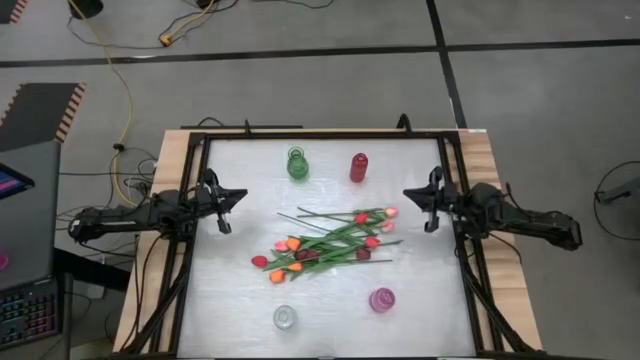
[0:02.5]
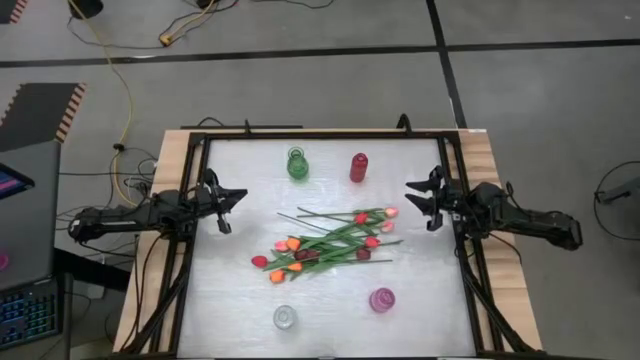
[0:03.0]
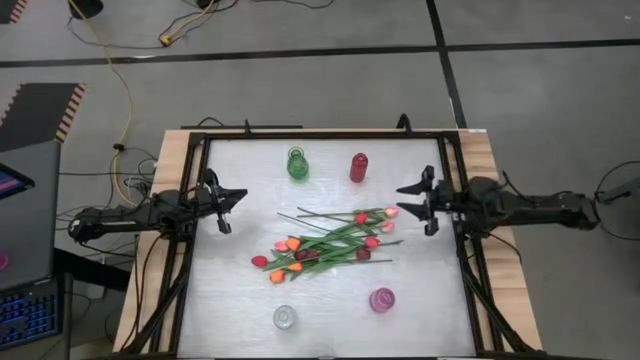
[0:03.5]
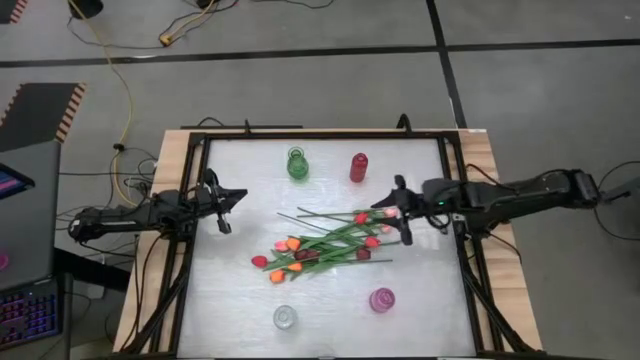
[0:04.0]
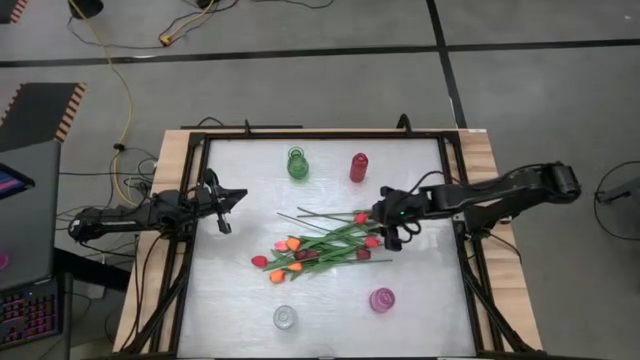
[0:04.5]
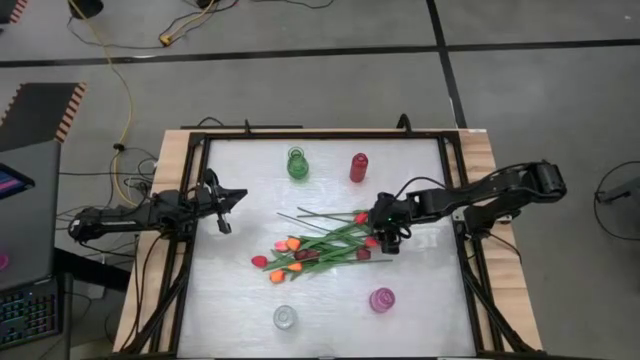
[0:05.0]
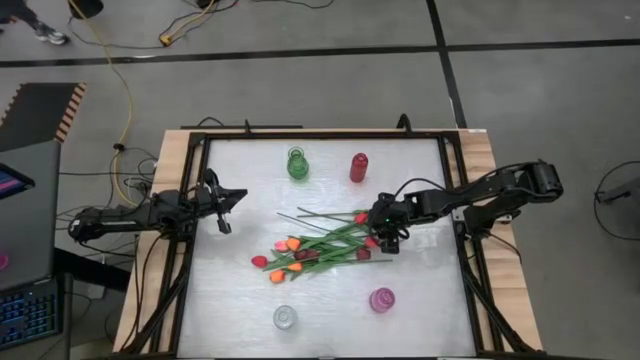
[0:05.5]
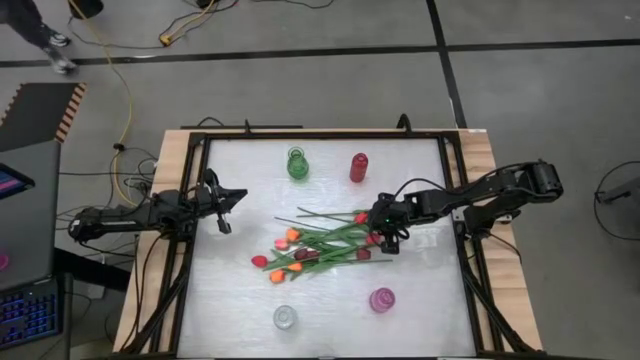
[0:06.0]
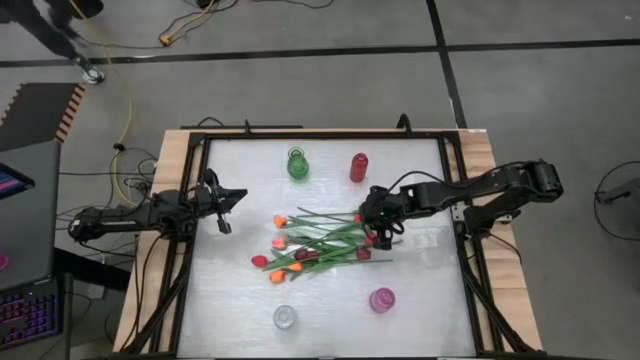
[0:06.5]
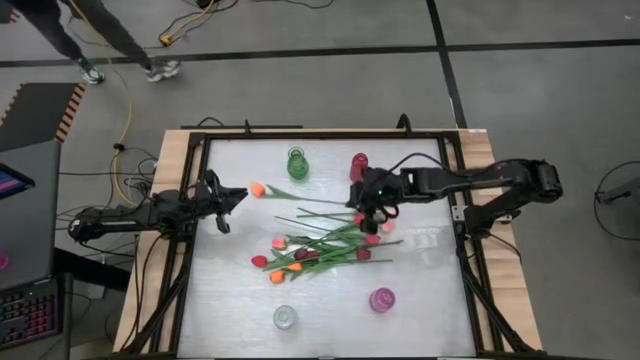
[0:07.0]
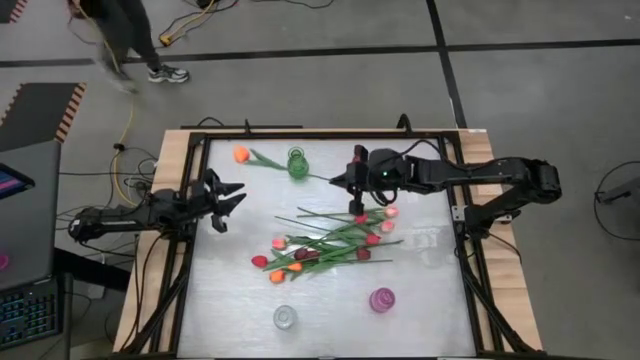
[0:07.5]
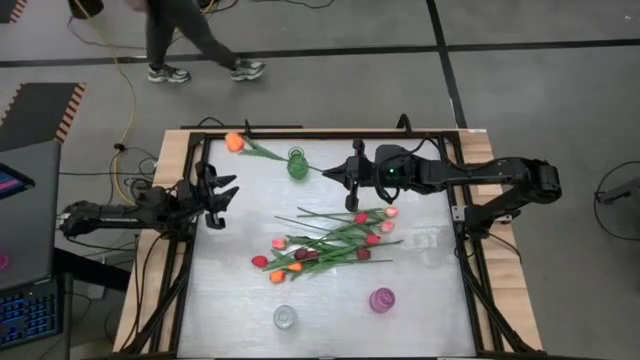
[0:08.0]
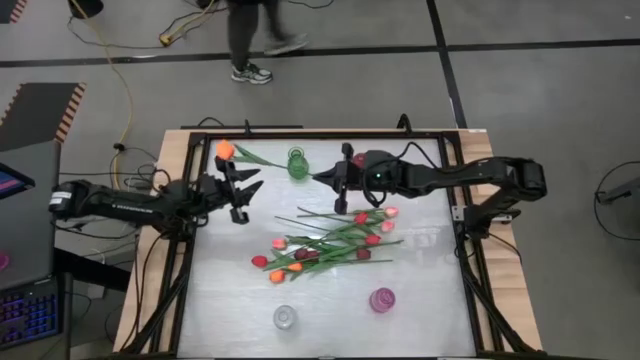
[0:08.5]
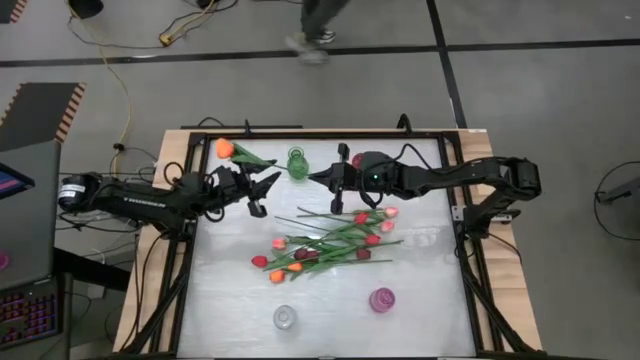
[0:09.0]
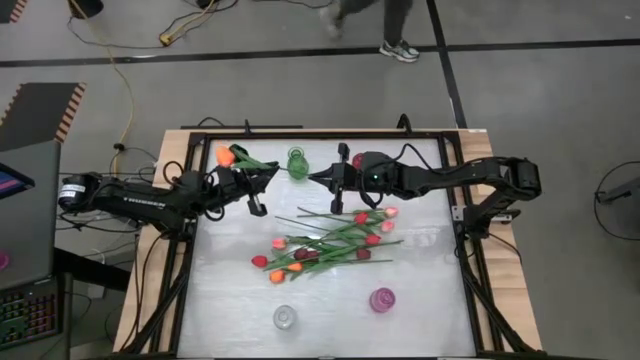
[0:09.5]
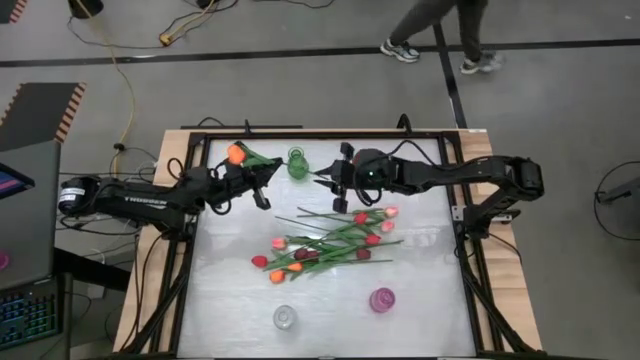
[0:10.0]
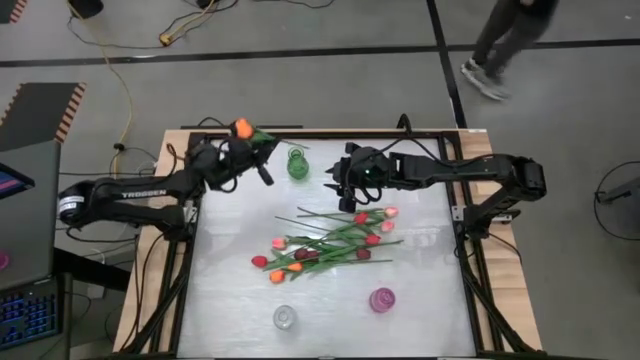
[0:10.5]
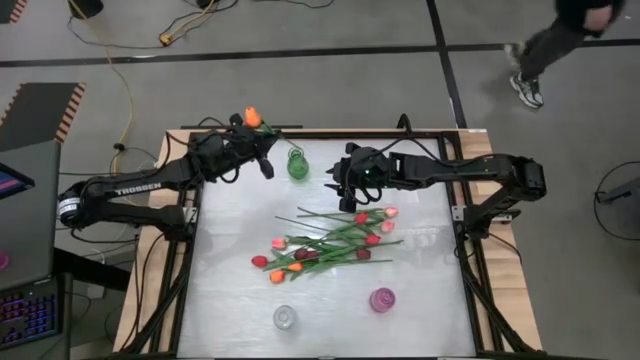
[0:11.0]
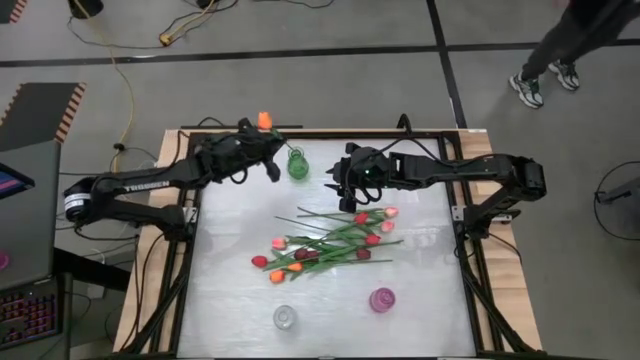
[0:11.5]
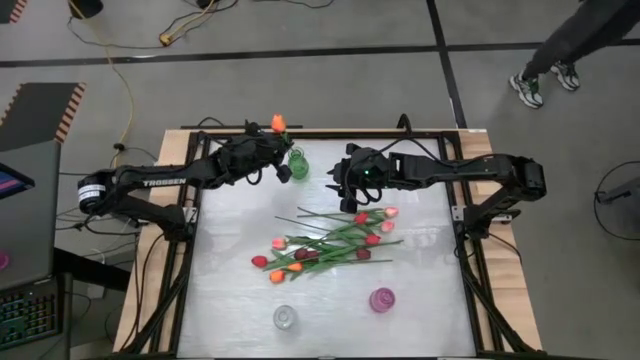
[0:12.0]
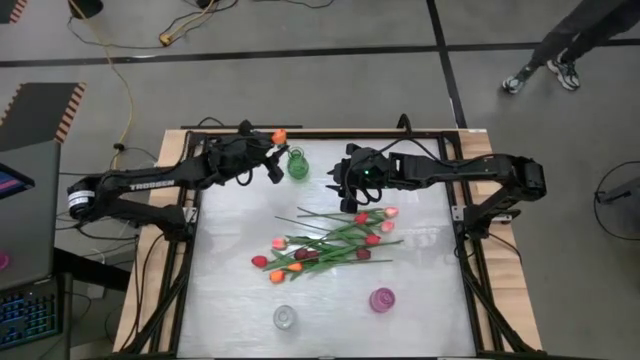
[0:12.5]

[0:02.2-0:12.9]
Task: Sort flowers into vase by color
Put the orange flower into the green vase

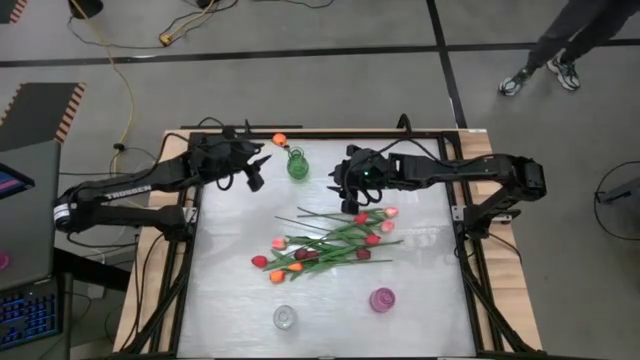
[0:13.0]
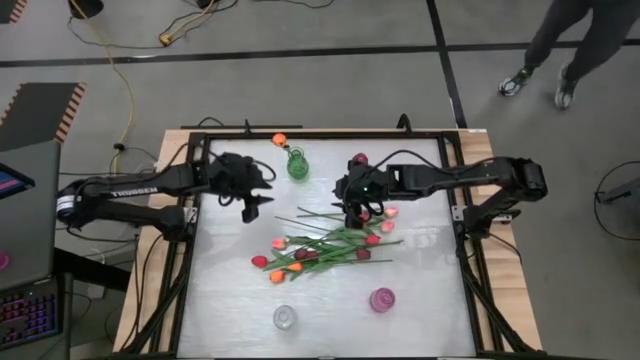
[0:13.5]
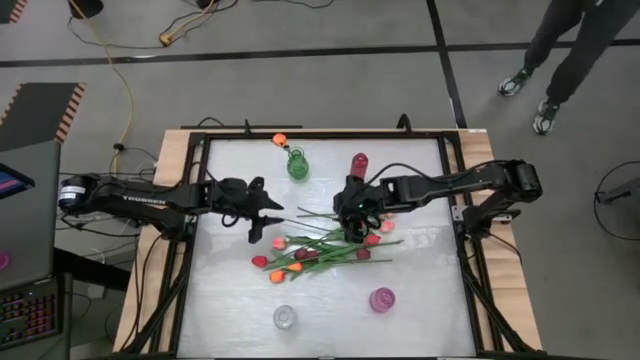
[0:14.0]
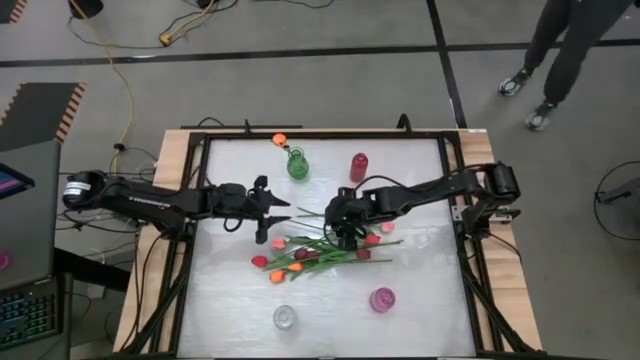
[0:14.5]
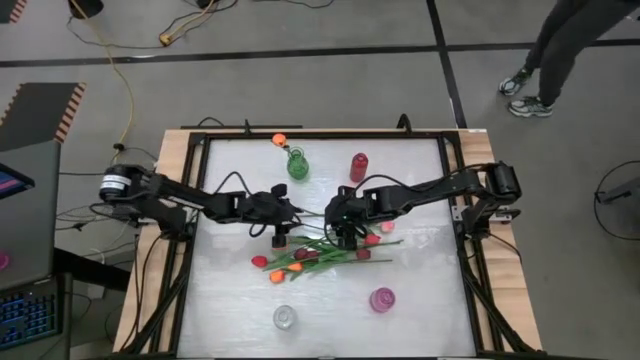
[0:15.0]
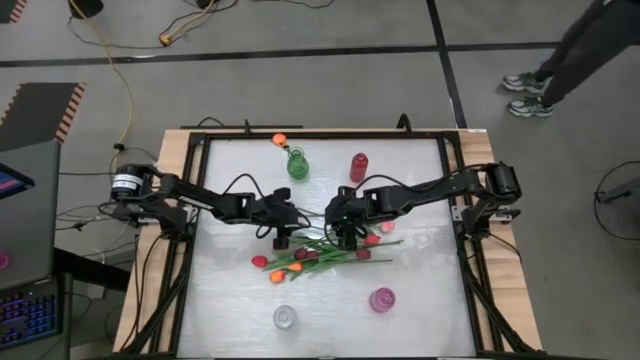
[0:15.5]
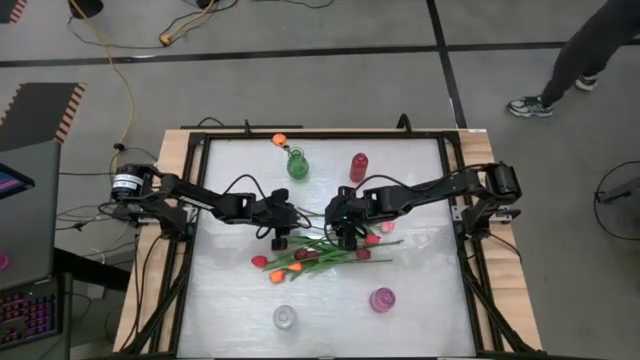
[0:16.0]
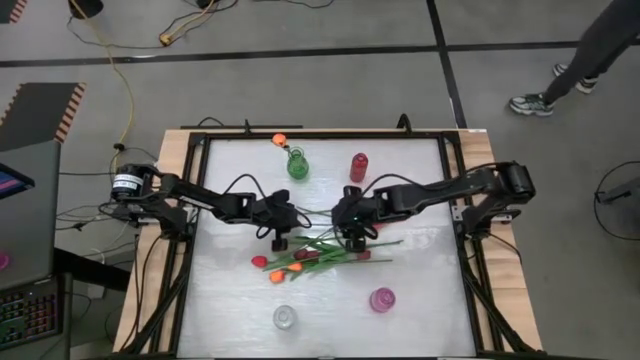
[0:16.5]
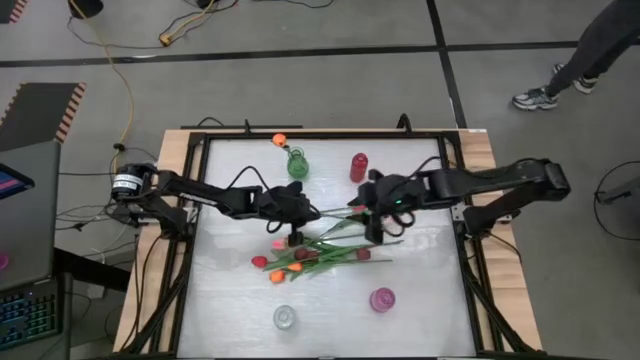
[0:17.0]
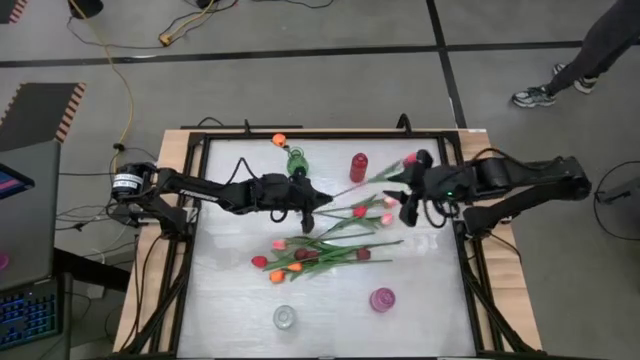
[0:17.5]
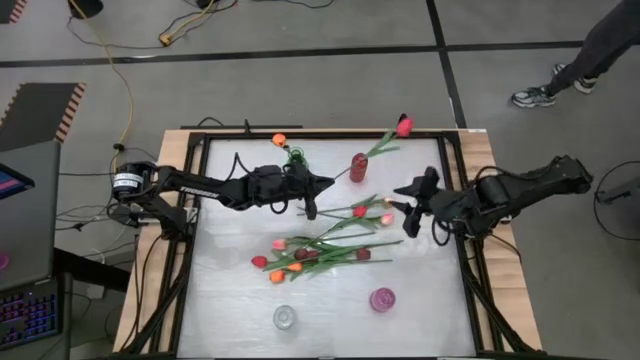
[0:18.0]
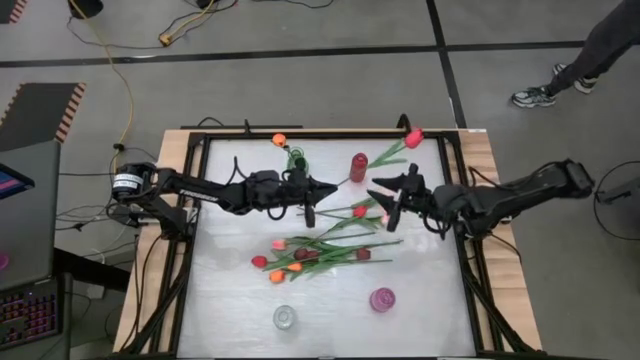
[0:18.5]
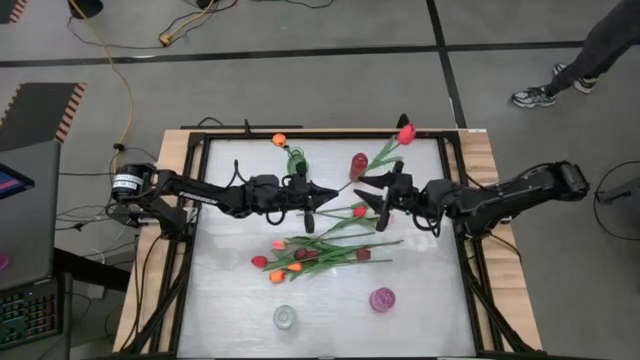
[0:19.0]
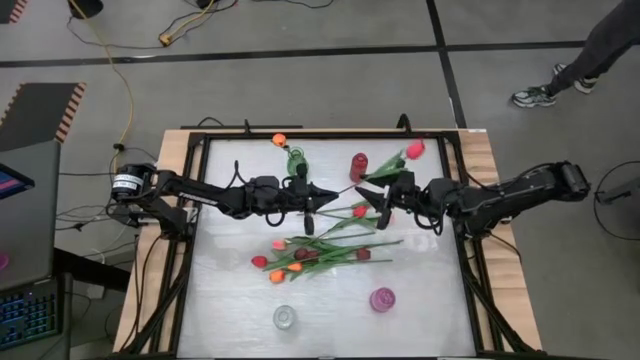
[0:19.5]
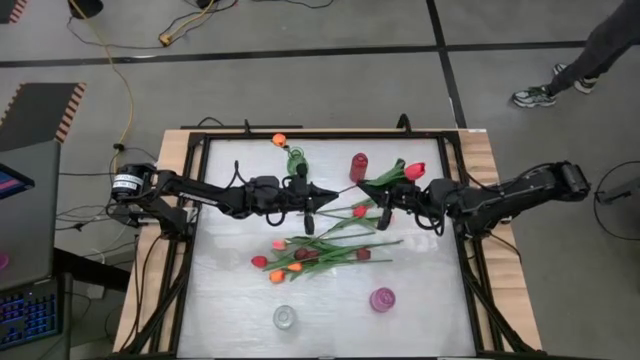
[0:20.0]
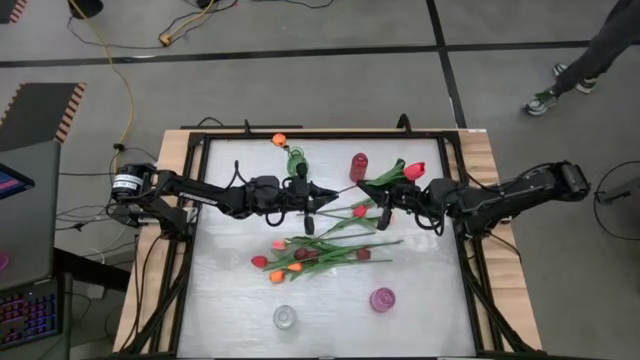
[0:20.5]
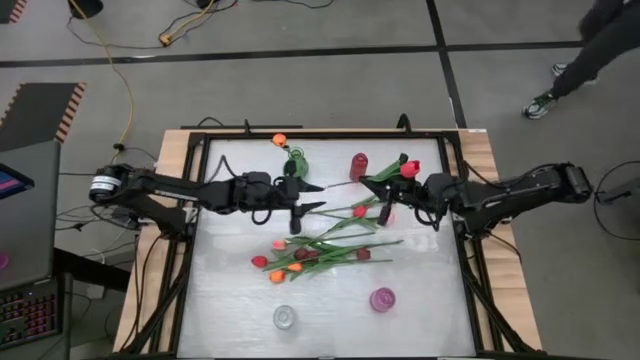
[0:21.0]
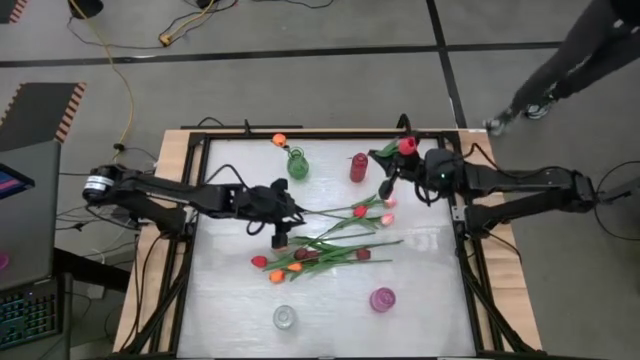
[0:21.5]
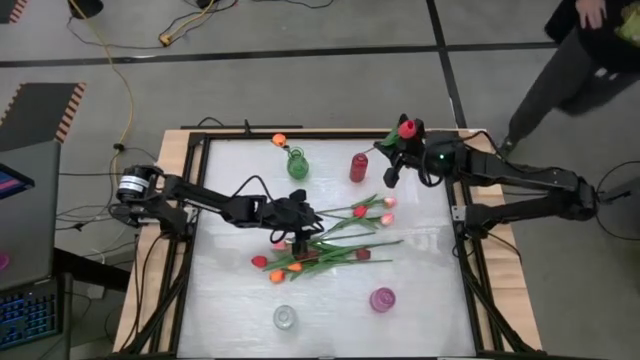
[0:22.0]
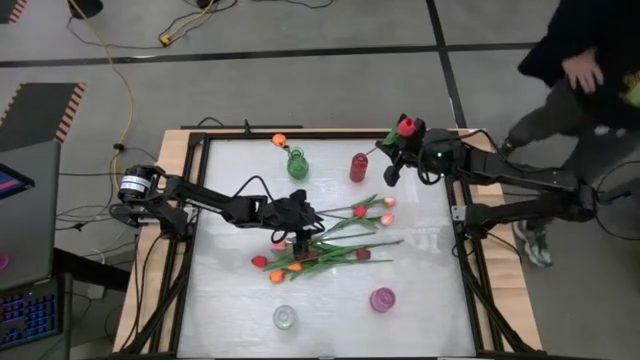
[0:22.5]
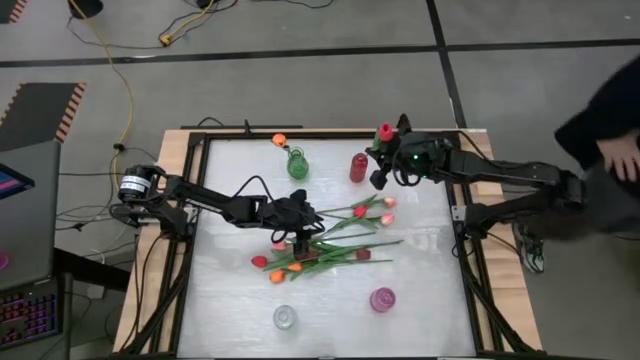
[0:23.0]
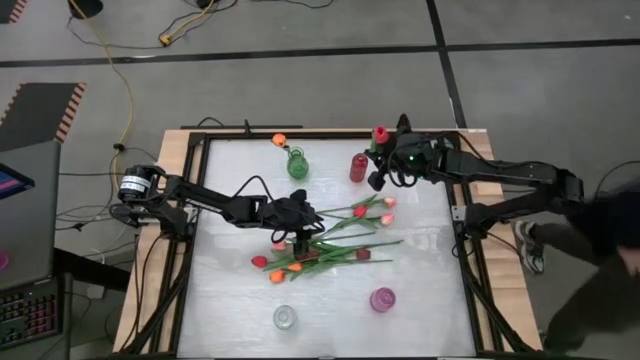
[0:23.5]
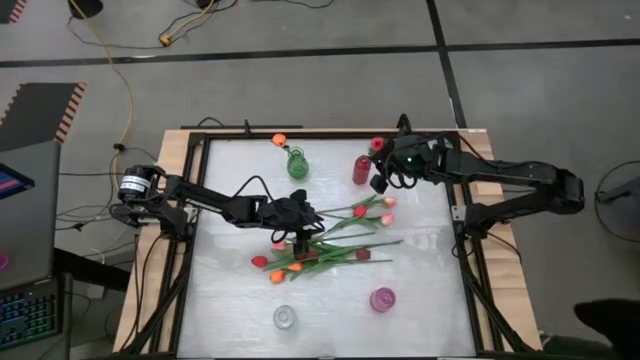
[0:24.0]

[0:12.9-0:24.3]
Put the red flower into the red vase
